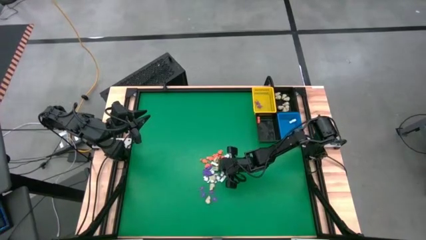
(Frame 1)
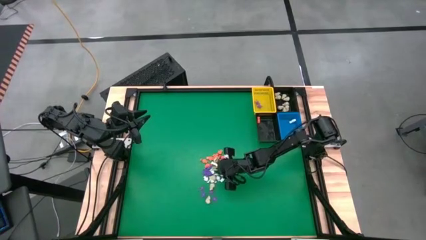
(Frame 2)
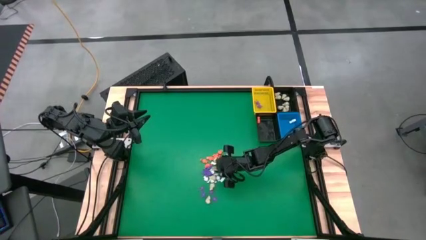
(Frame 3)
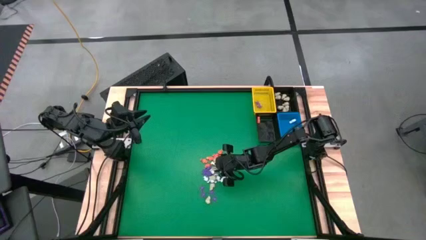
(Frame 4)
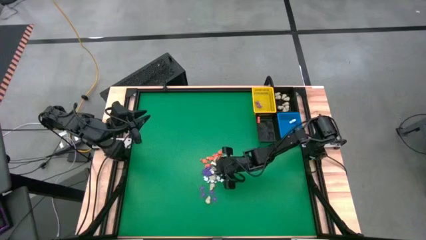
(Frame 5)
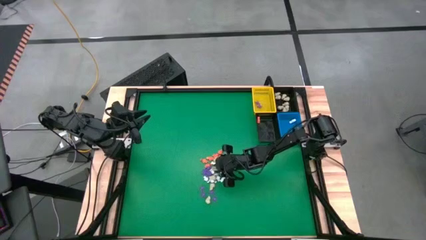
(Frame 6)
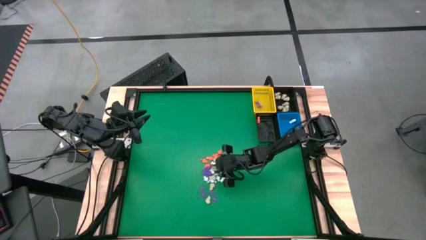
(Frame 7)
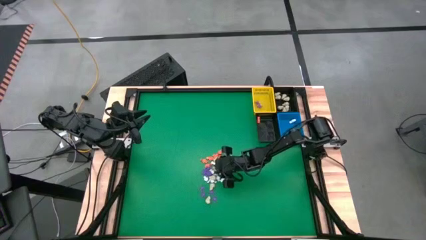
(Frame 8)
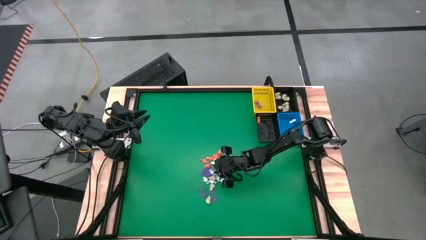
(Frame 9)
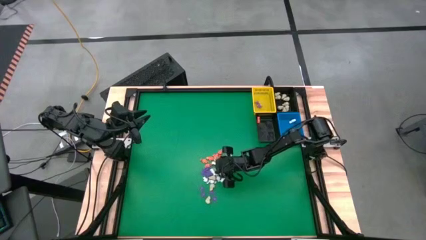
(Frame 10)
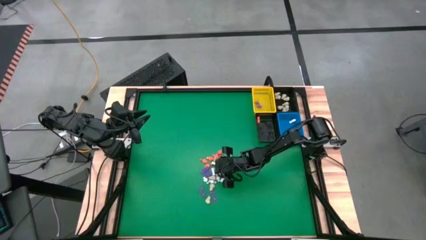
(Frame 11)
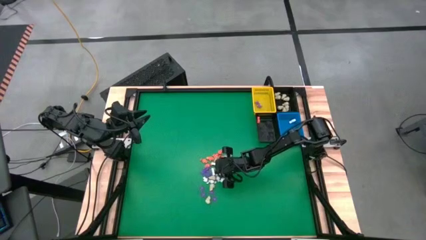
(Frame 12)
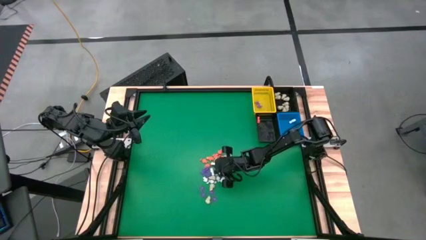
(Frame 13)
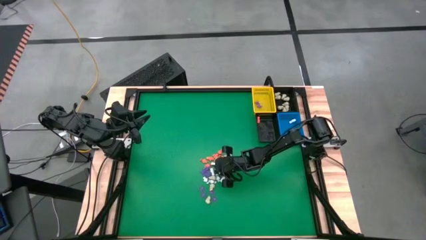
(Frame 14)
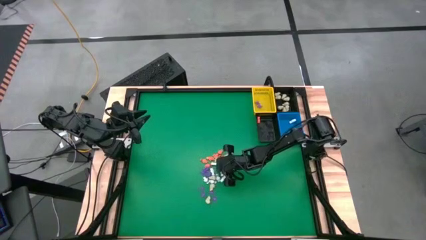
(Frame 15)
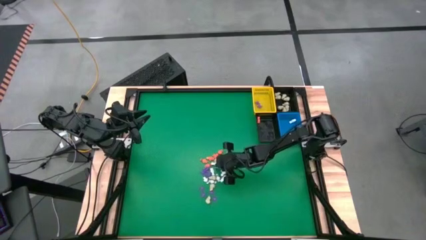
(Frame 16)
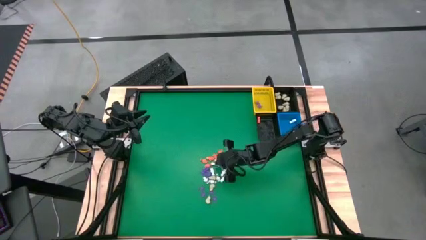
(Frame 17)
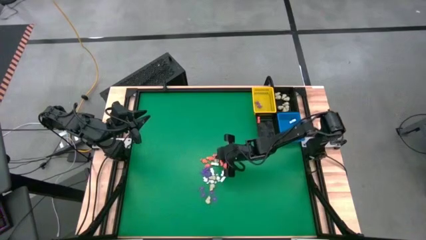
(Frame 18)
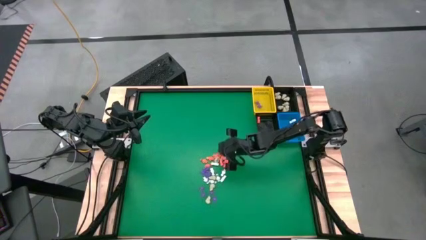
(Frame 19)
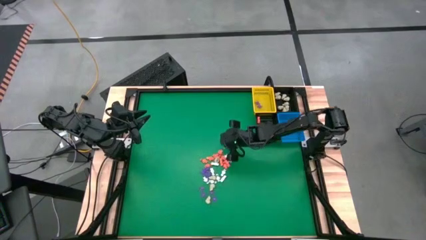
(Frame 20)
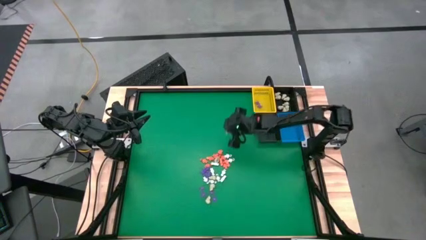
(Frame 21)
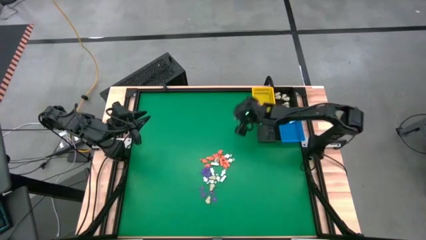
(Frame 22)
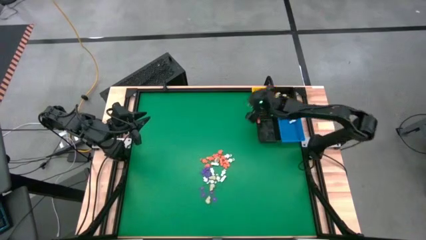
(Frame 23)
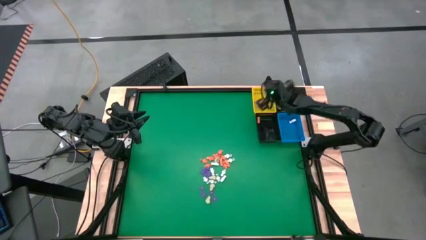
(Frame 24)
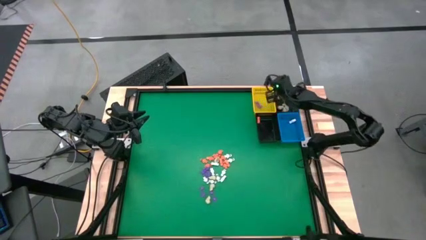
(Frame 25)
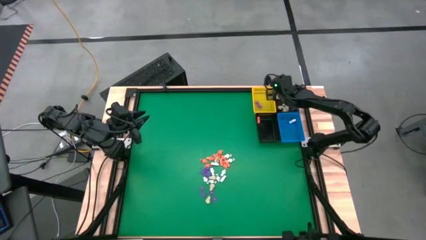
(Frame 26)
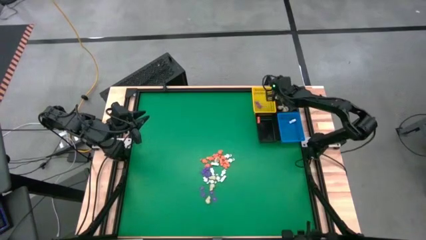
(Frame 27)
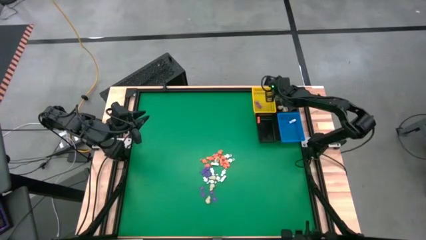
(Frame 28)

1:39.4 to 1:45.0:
Task: Sort Halloween decoration
Put the gray skull toy into the top black basket

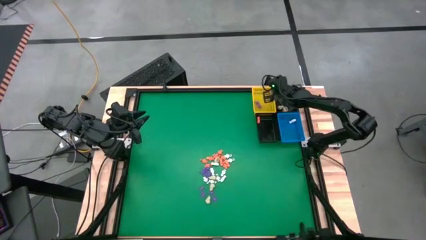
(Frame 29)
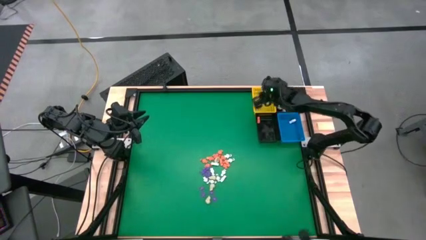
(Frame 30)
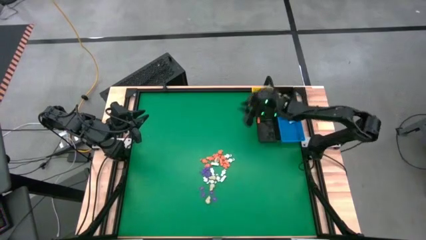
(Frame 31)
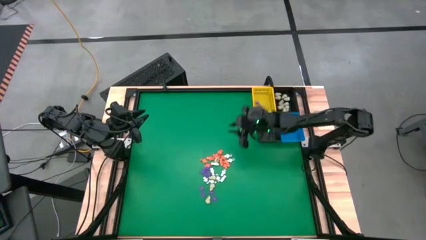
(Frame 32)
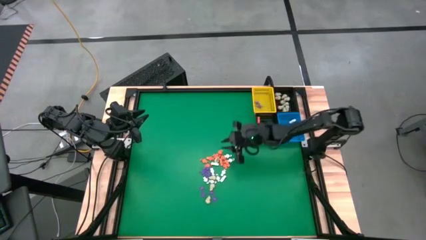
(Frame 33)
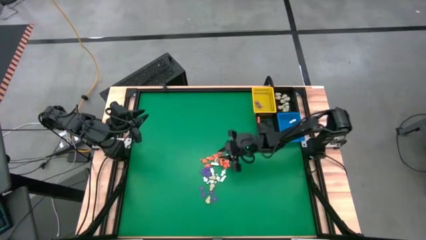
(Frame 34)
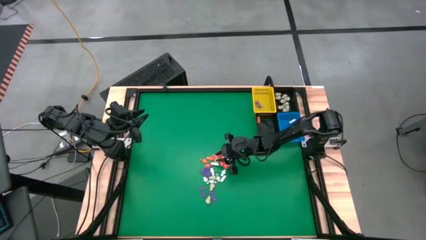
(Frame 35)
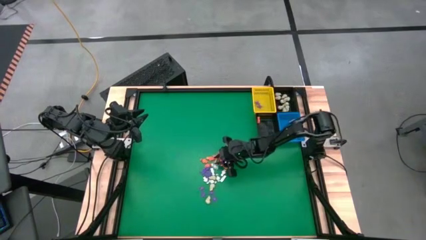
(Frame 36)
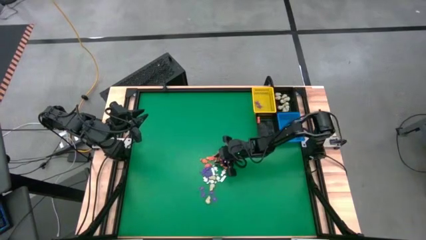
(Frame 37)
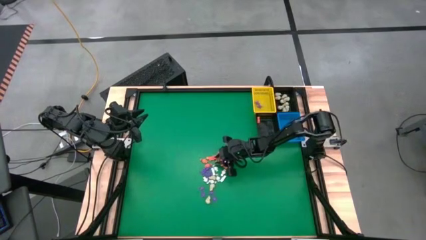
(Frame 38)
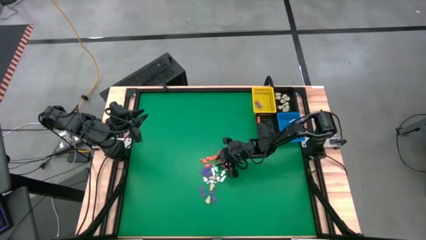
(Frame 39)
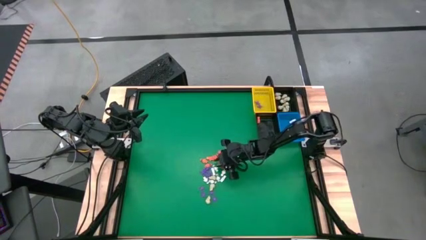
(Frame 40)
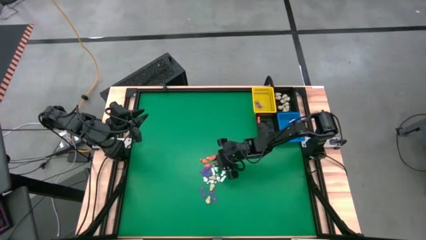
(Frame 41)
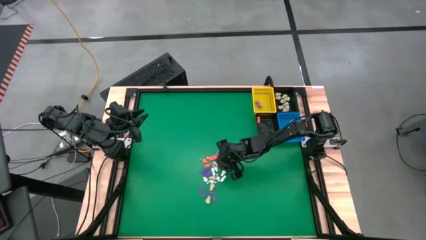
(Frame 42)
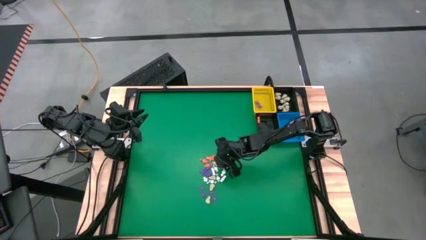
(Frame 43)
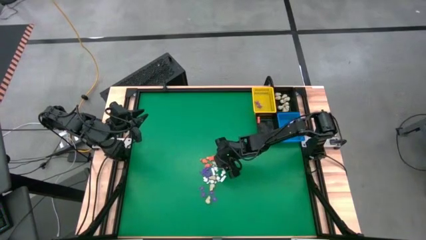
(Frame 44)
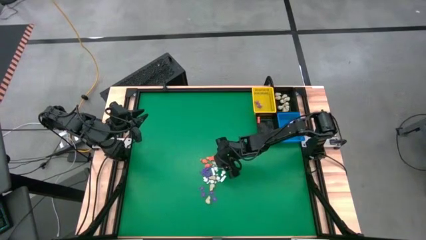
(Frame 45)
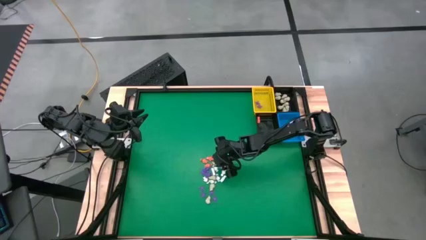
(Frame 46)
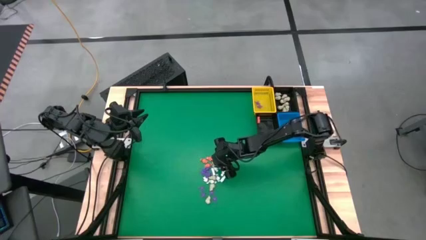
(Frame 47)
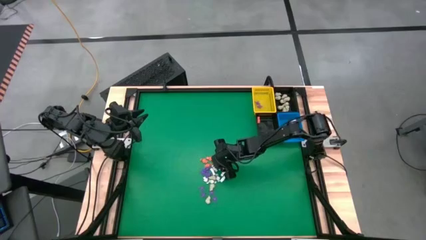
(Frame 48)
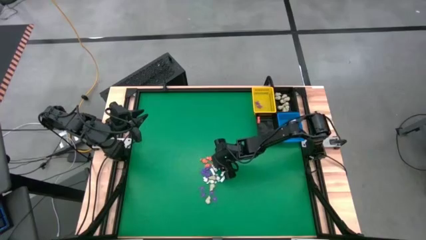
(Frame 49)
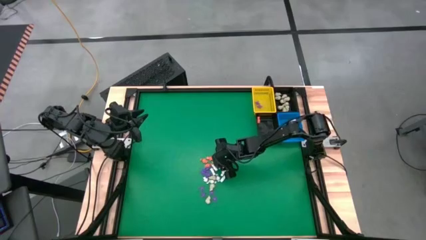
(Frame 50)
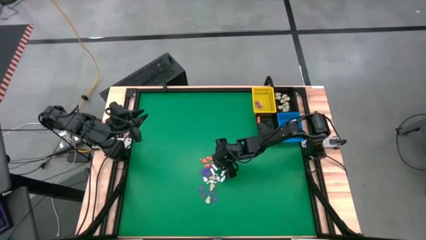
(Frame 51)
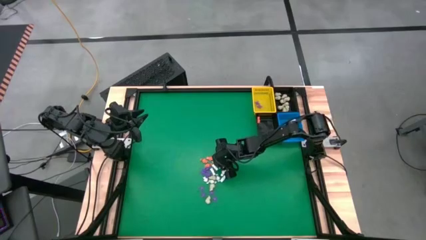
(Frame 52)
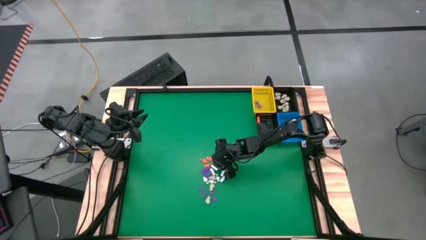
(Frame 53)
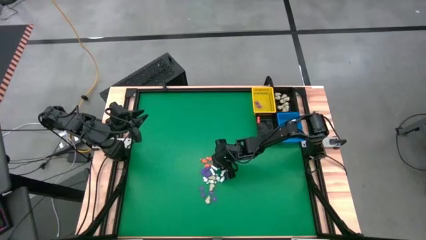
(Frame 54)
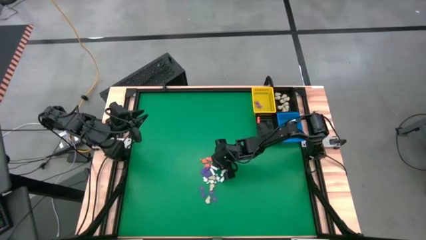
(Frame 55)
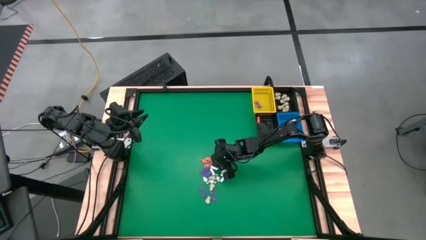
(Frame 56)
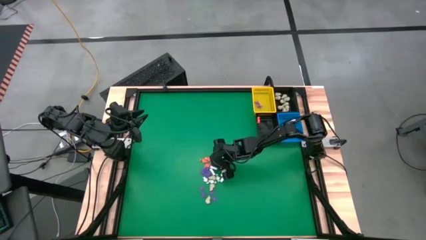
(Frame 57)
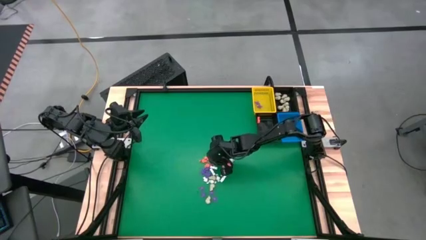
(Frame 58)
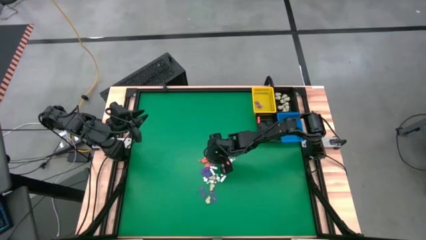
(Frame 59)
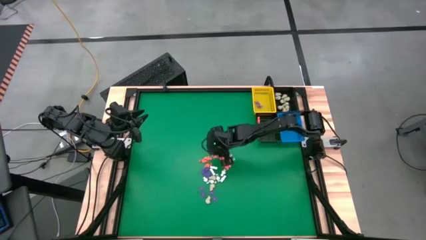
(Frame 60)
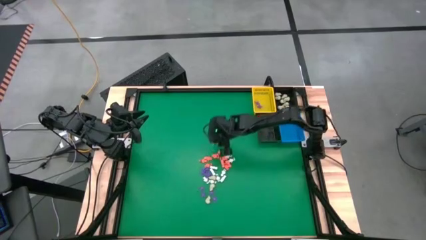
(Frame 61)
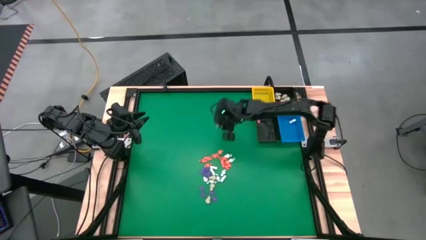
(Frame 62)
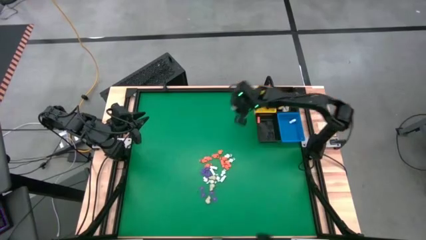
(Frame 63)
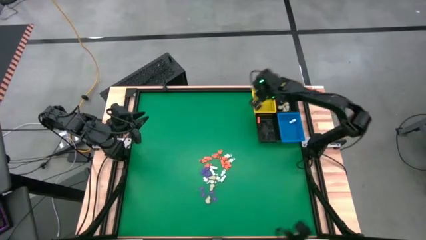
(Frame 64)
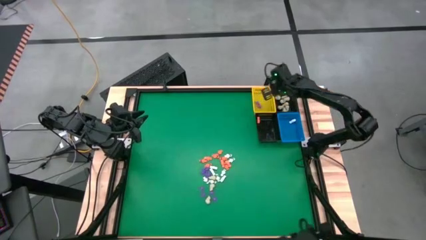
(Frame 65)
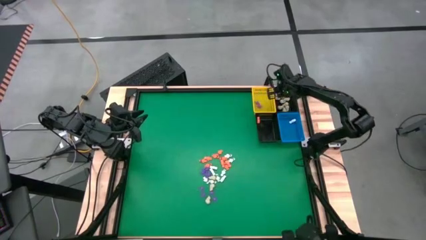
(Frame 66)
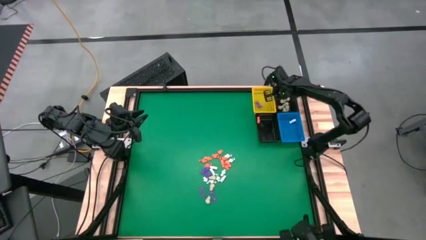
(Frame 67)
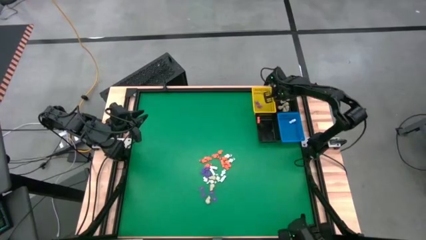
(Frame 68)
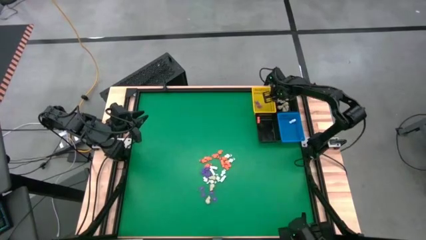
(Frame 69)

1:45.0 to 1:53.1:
Put the gray skull toy into the top black basket

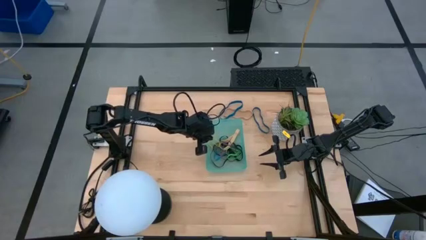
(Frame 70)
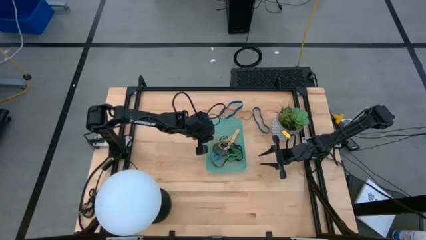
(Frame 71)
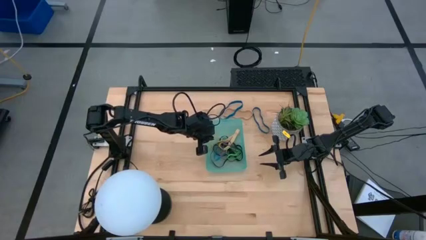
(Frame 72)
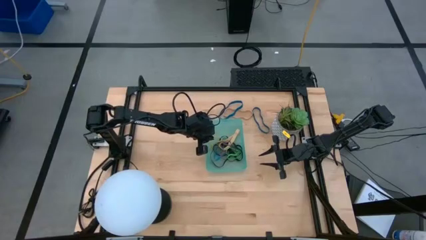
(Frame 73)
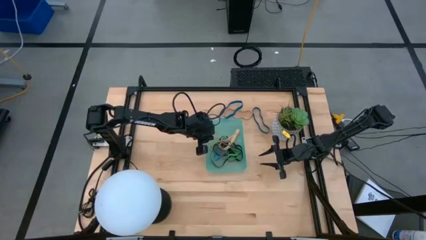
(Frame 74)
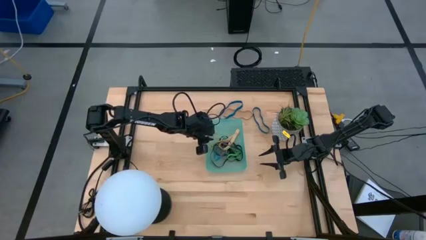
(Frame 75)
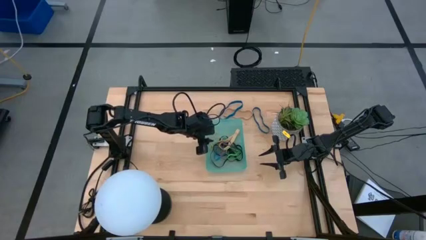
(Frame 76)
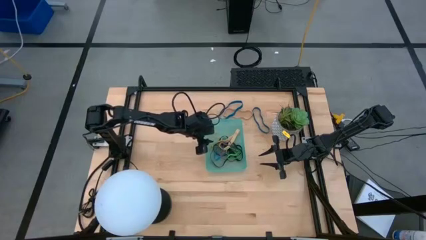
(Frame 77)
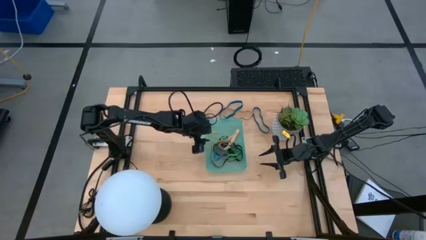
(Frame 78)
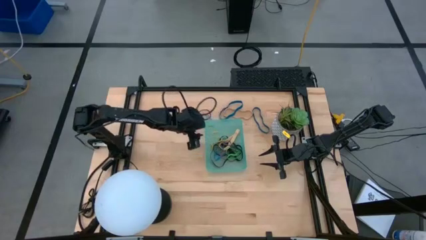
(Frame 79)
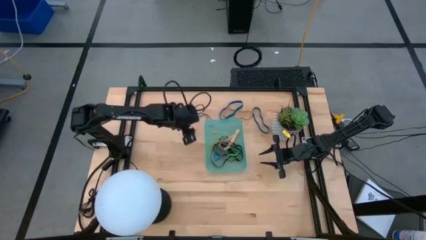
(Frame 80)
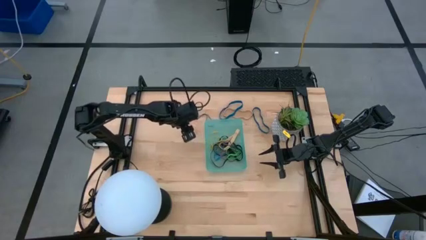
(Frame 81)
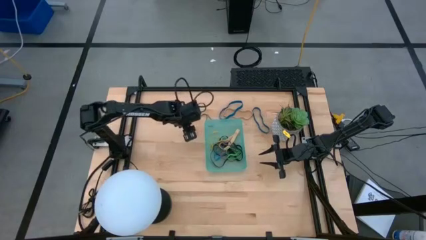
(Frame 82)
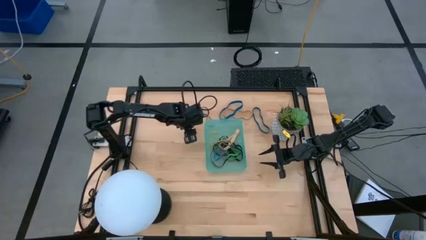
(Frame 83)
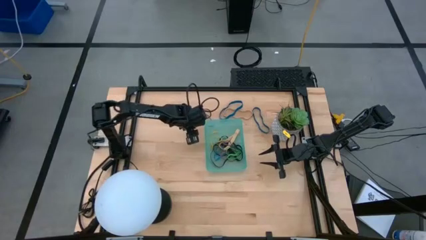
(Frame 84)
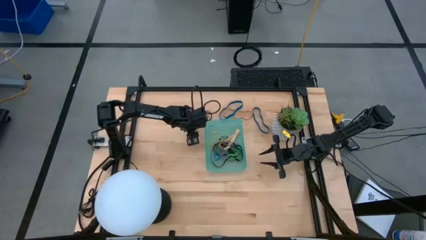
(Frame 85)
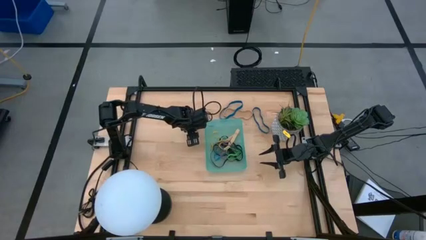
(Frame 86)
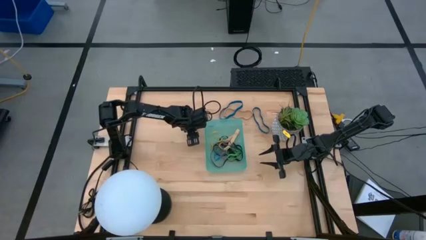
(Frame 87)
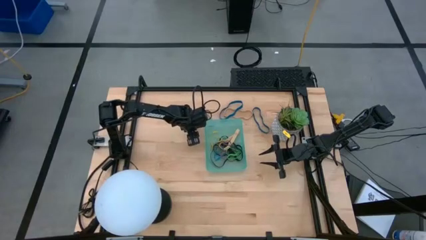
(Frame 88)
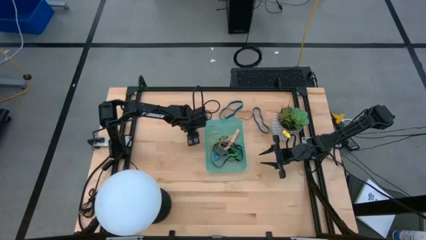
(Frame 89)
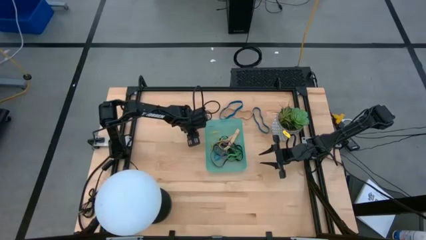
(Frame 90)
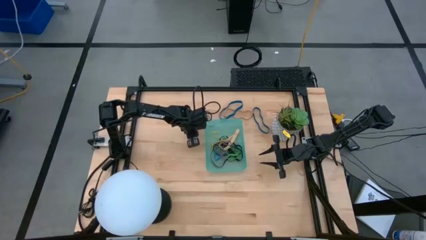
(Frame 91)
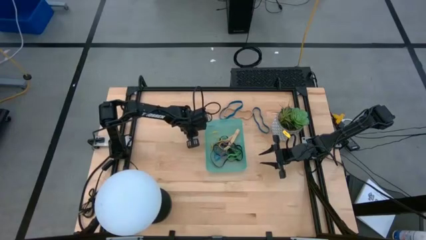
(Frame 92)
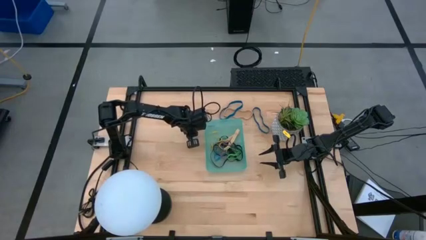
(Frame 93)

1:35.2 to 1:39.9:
Task: Pick and place rubber bands into bin
Put the orange rubber band into the green bin
